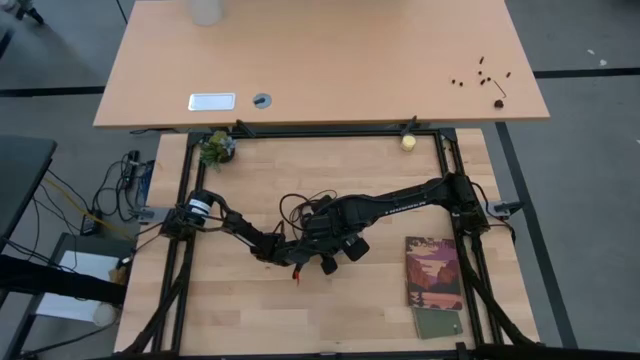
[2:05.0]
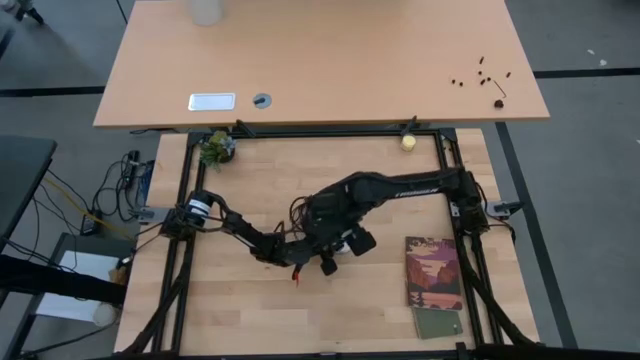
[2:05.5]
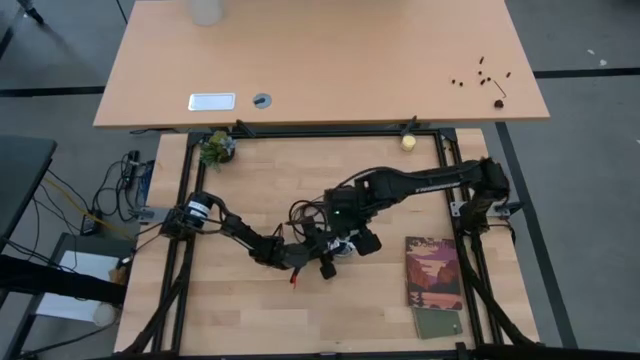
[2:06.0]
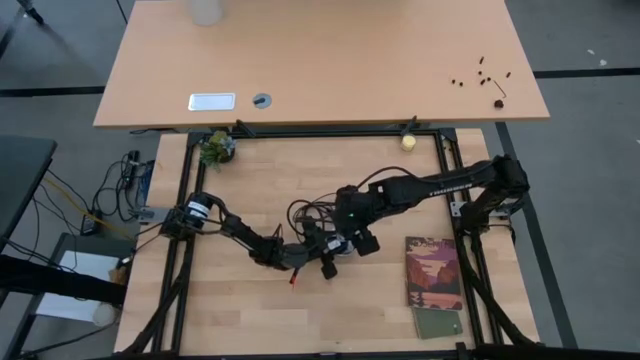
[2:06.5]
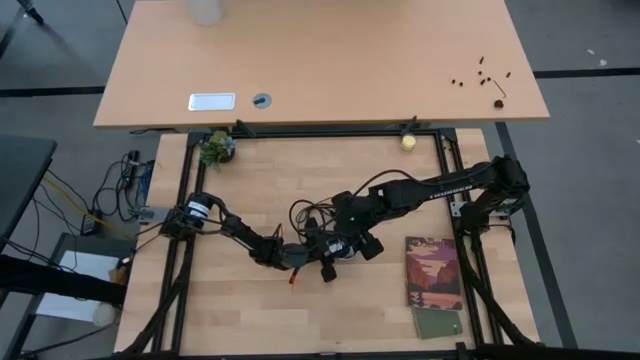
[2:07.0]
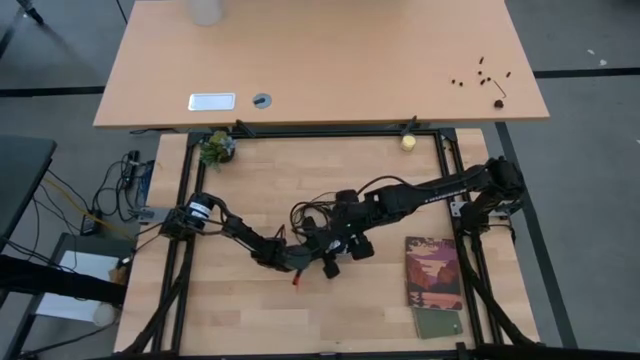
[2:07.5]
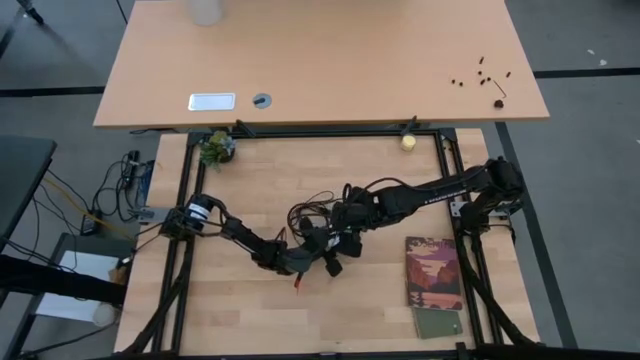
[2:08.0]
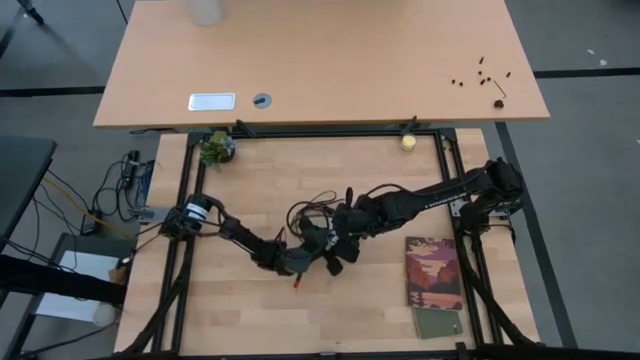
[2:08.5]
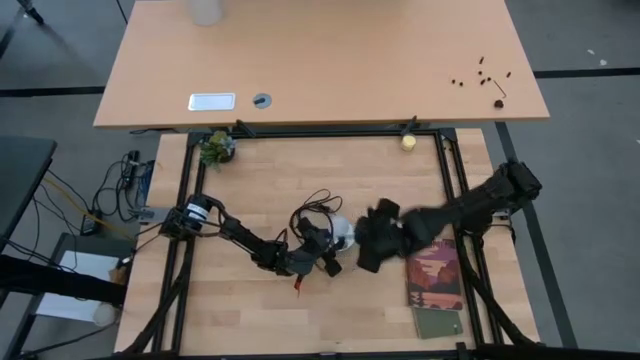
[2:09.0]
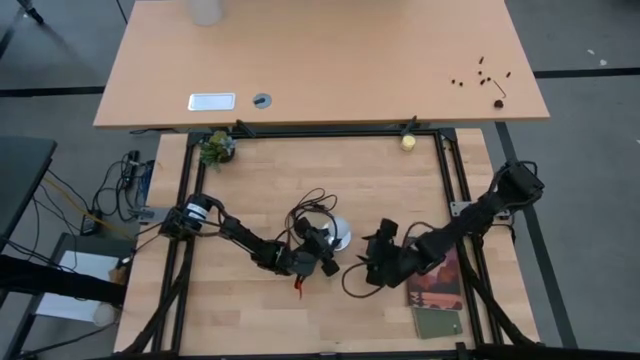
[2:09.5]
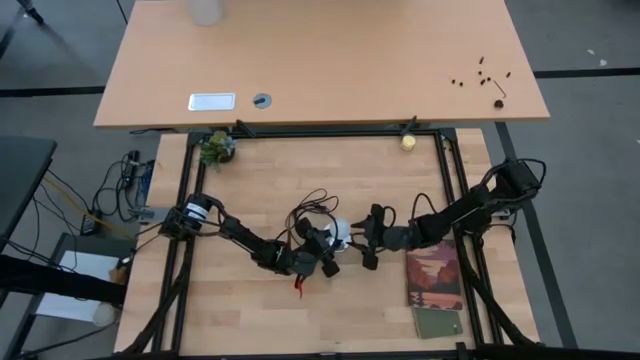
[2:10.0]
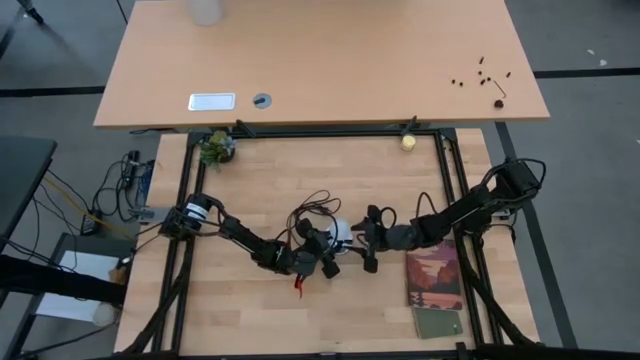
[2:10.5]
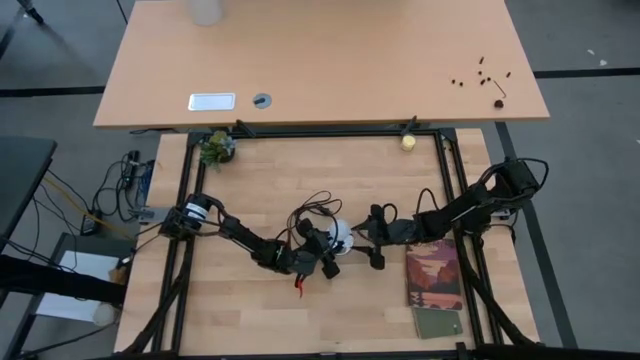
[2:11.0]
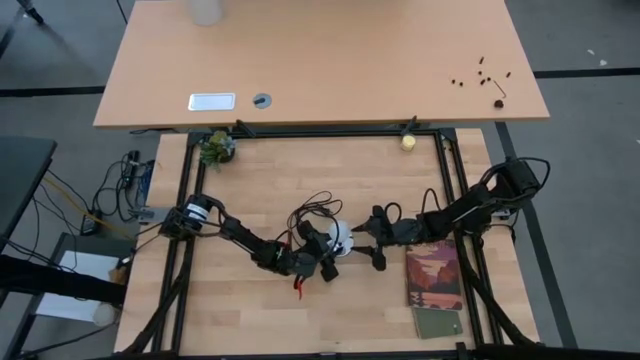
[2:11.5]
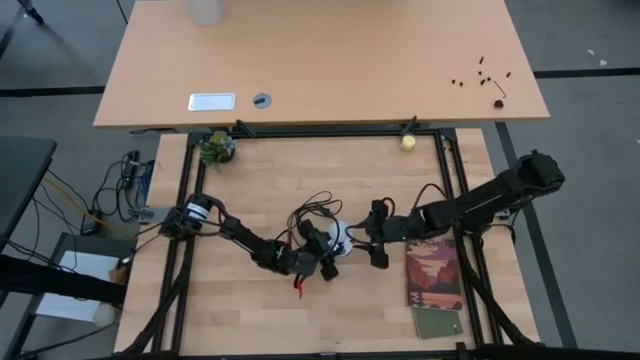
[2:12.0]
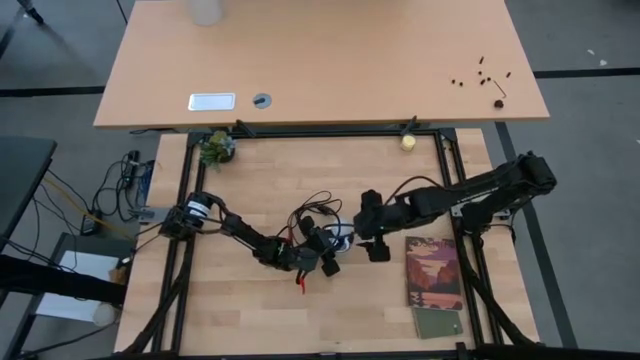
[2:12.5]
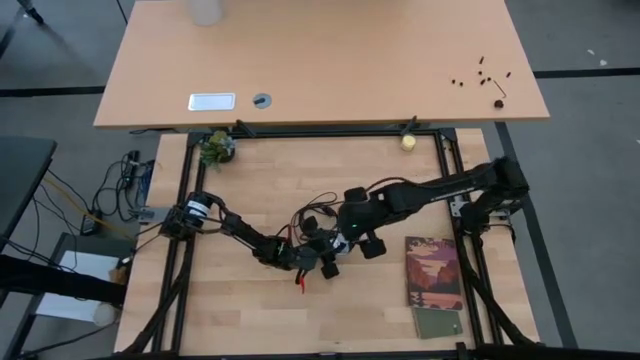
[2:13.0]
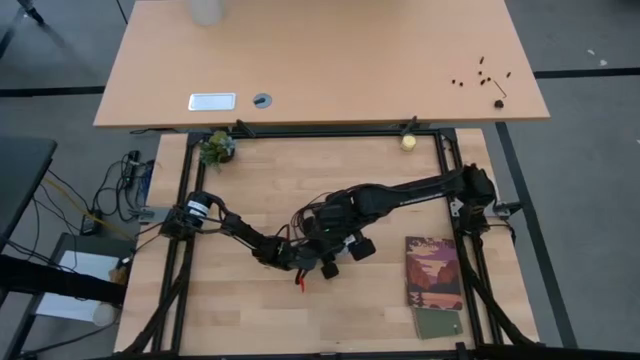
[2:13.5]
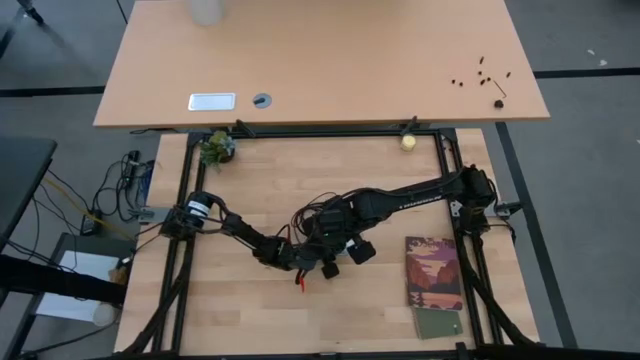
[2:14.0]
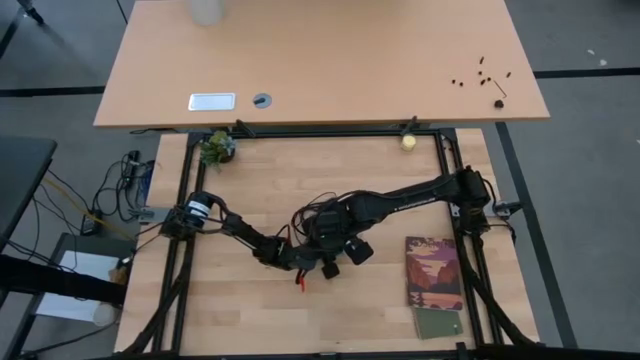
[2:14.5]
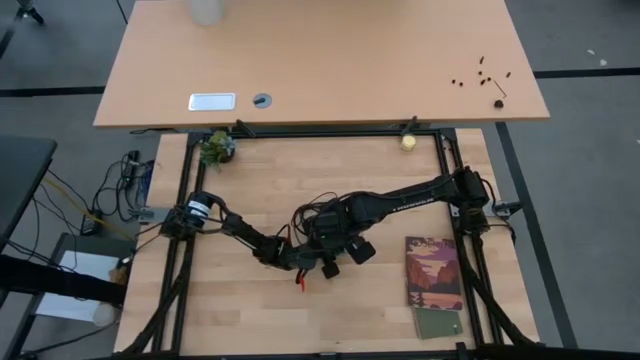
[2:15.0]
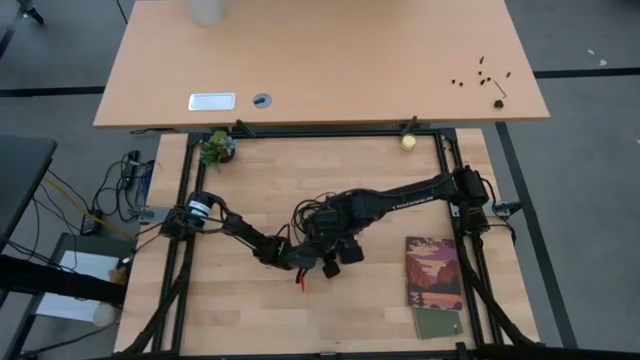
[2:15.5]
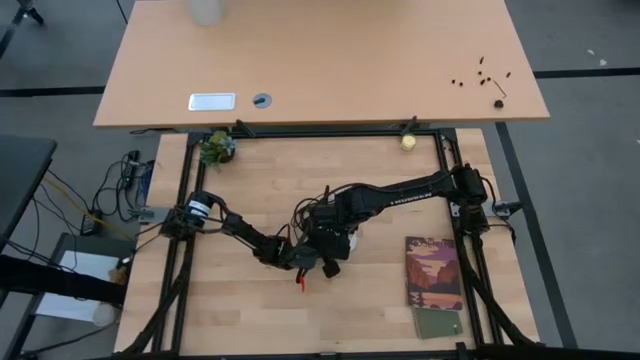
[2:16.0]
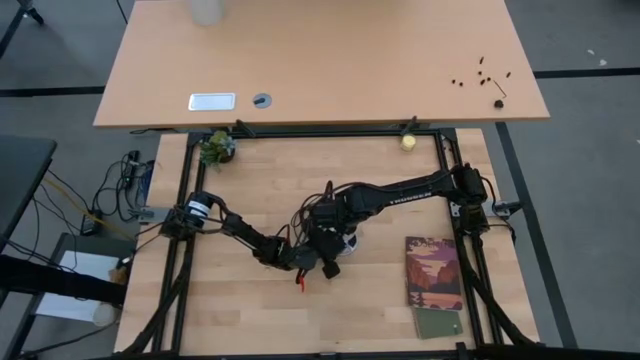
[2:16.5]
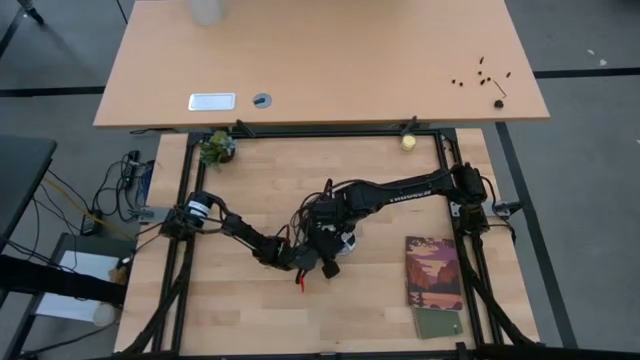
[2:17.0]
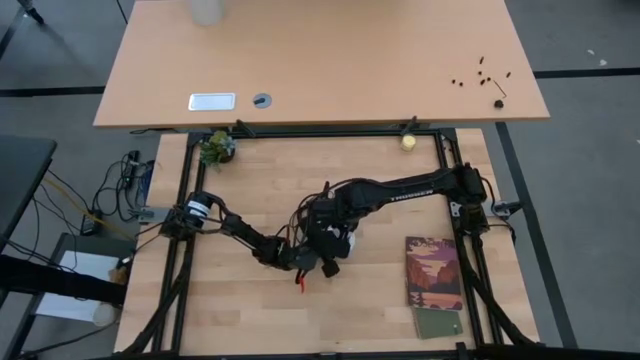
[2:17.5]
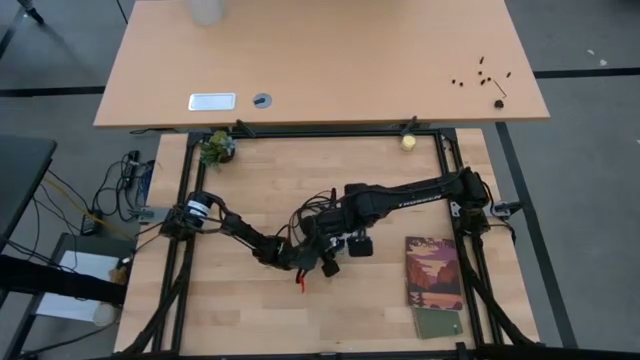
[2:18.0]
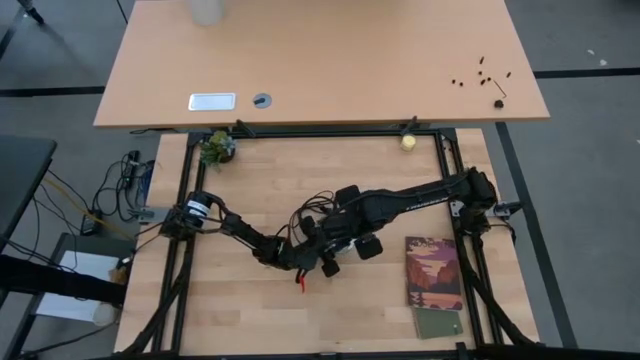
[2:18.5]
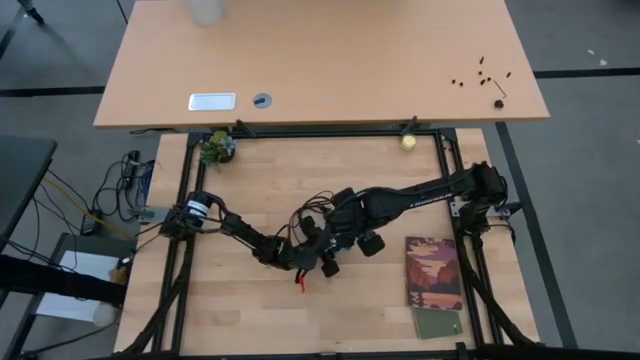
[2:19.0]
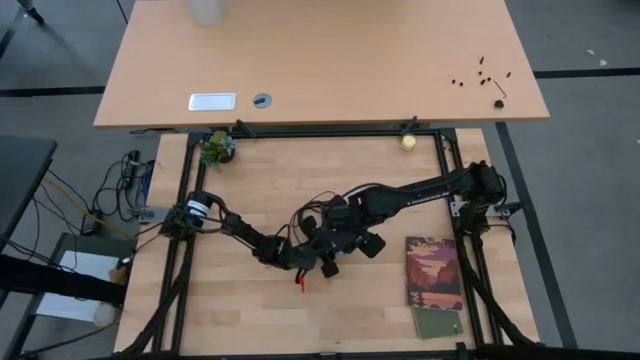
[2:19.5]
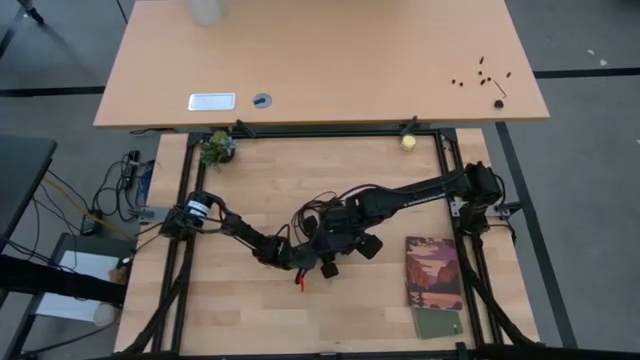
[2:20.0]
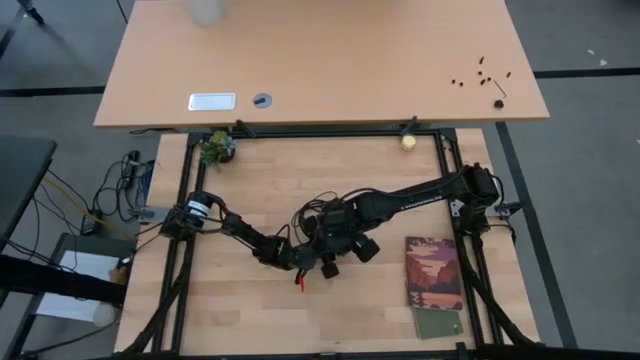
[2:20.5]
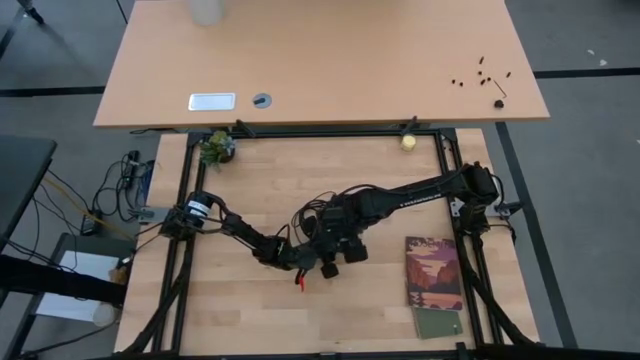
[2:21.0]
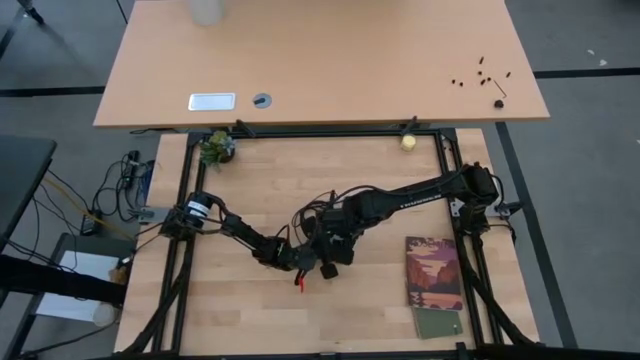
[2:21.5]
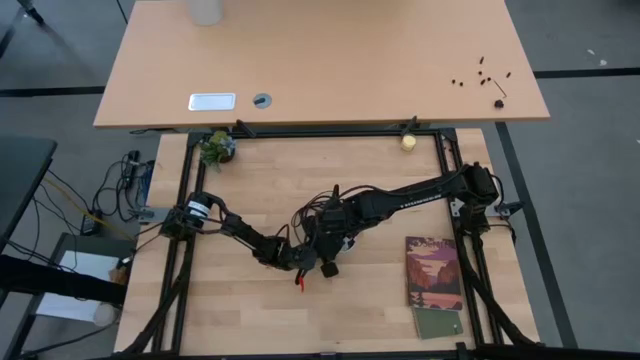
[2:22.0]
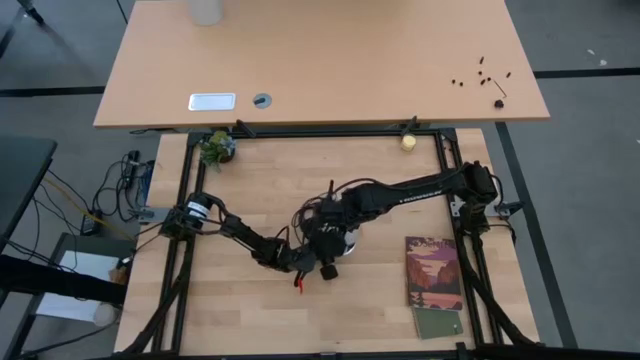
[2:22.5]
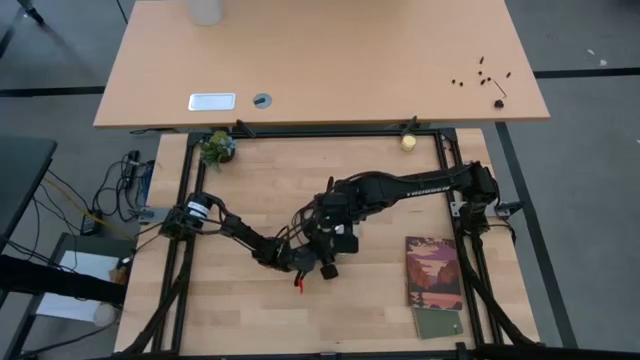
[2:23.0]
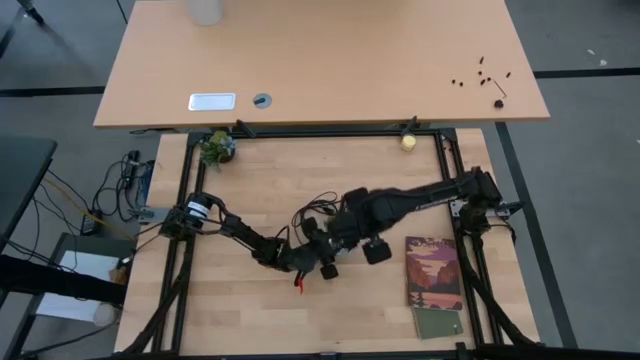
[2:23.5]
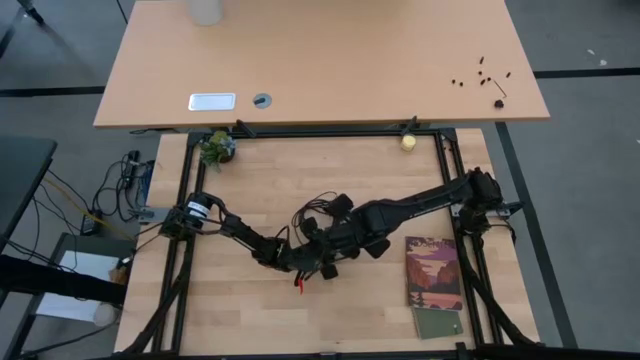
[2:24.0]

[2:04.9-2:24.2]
Task: Screw lightbulb
Insert the white lightbulb into the silver lamp
